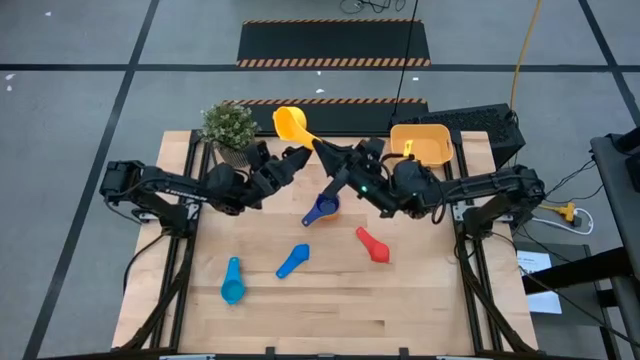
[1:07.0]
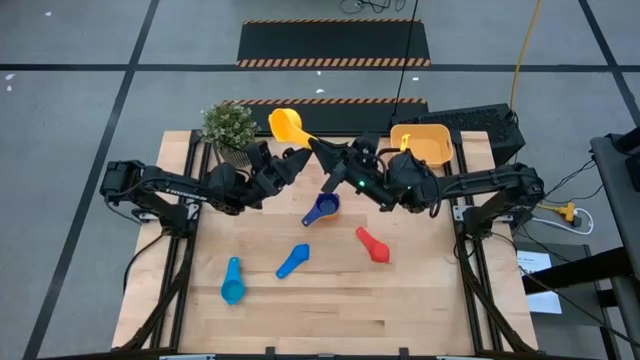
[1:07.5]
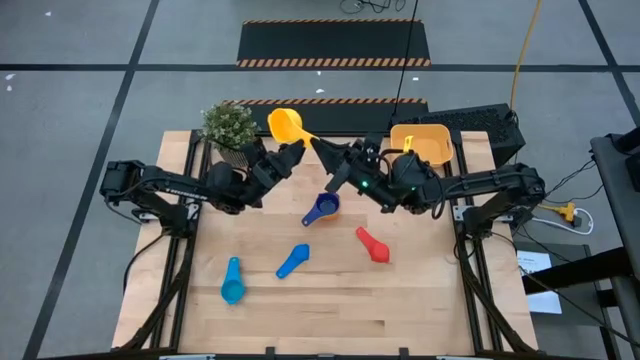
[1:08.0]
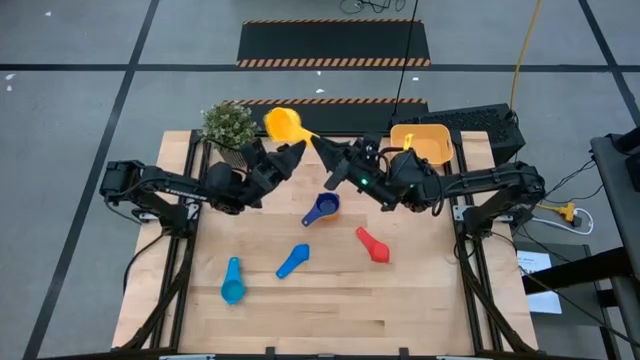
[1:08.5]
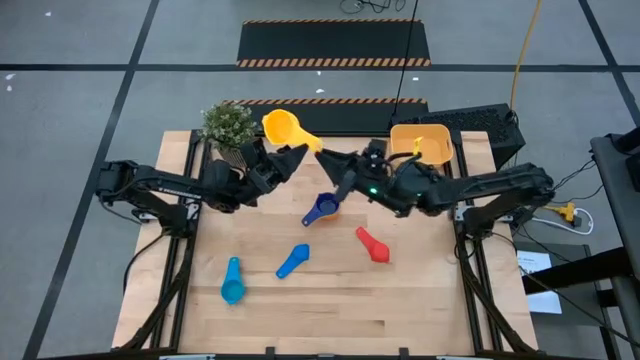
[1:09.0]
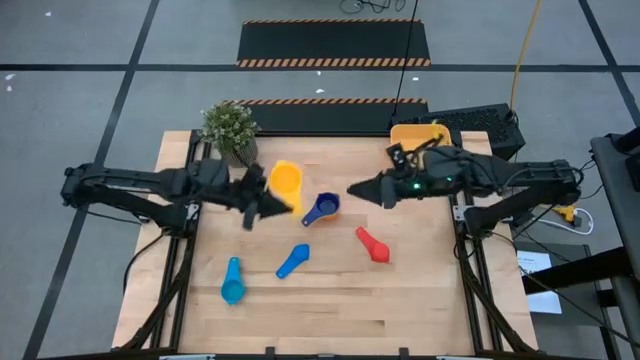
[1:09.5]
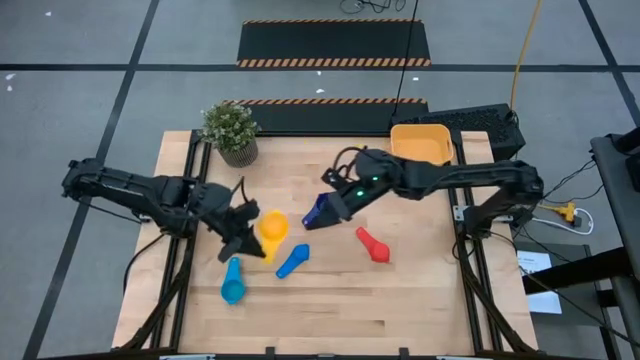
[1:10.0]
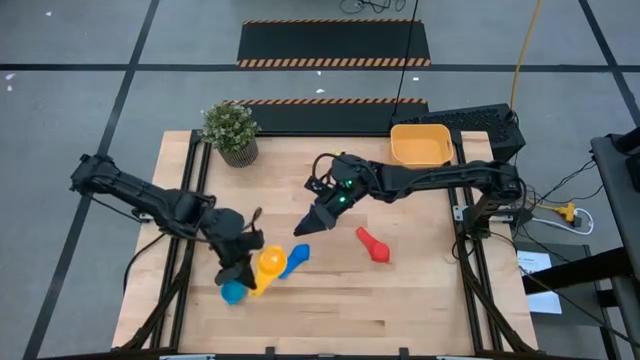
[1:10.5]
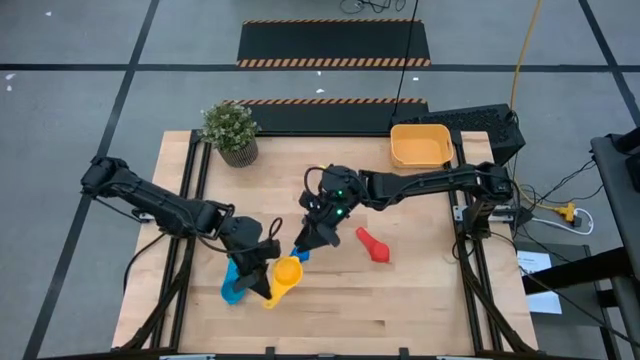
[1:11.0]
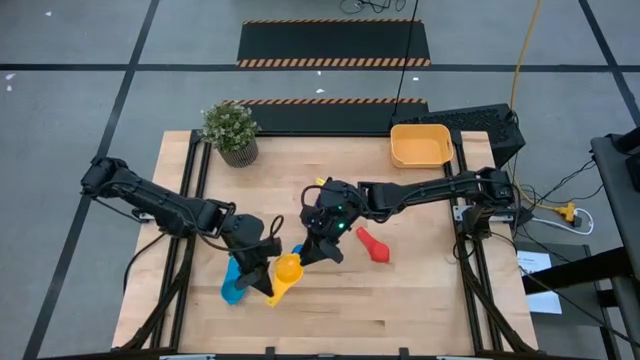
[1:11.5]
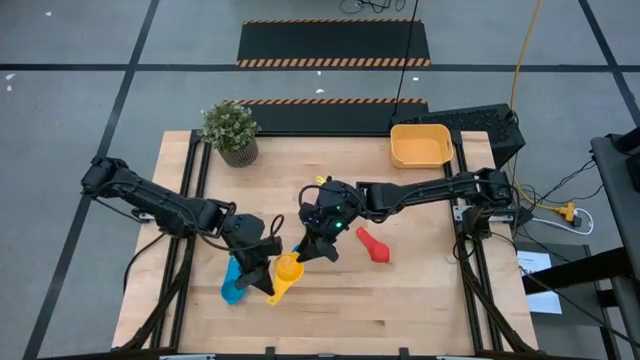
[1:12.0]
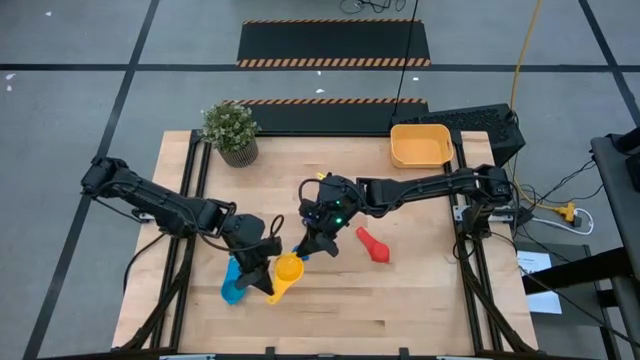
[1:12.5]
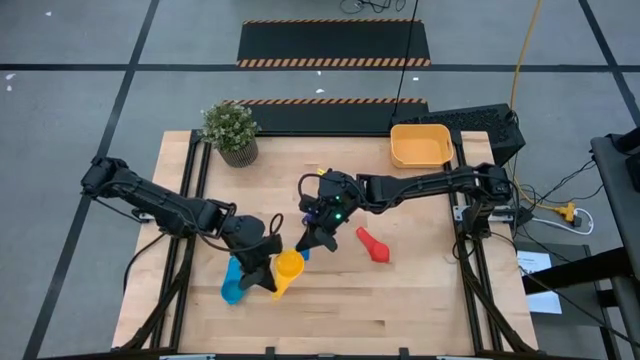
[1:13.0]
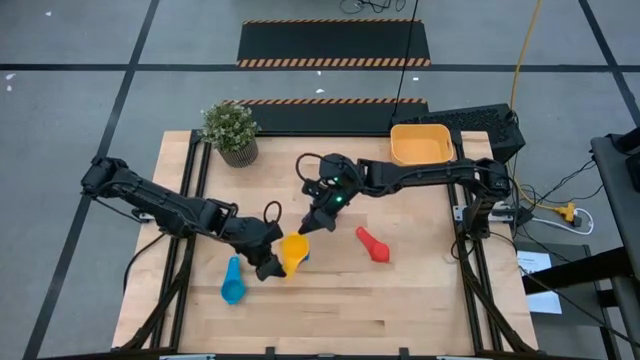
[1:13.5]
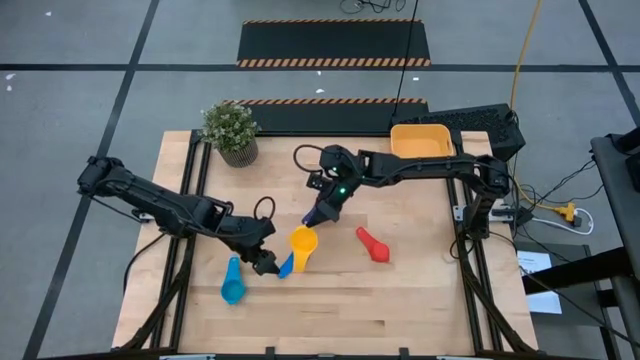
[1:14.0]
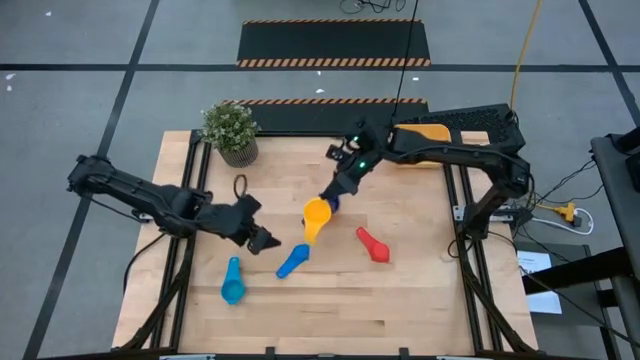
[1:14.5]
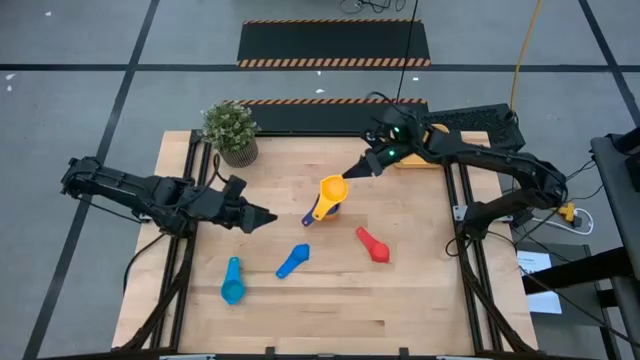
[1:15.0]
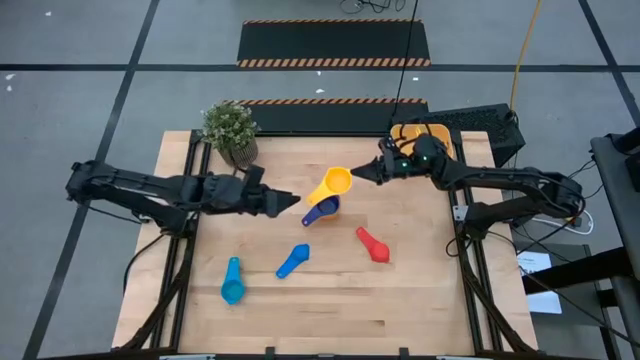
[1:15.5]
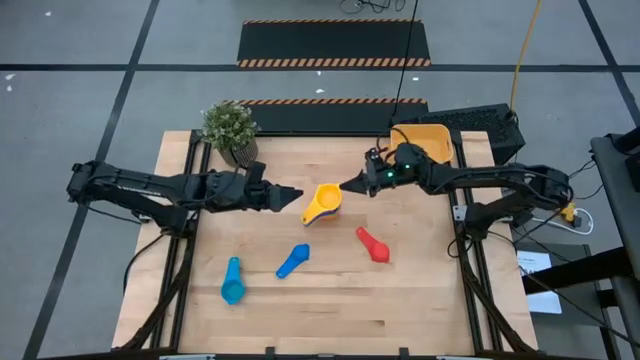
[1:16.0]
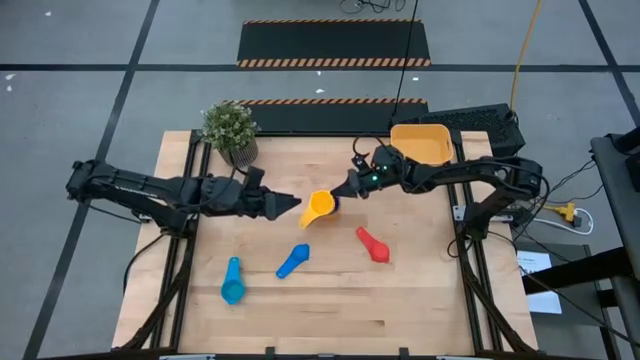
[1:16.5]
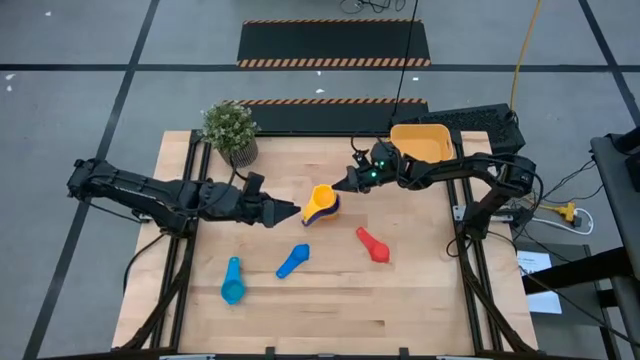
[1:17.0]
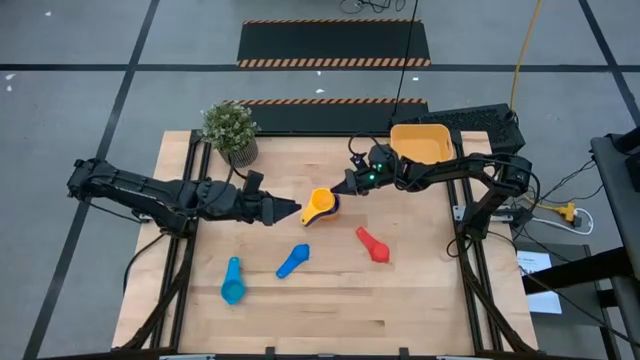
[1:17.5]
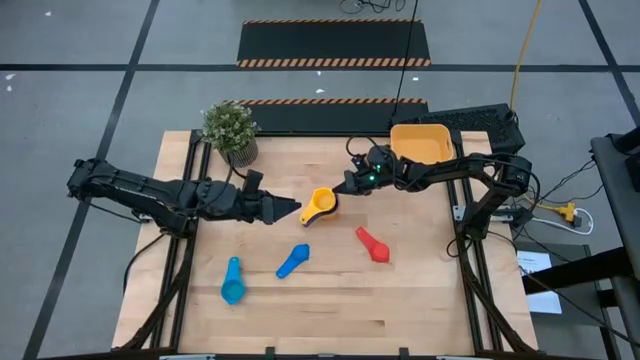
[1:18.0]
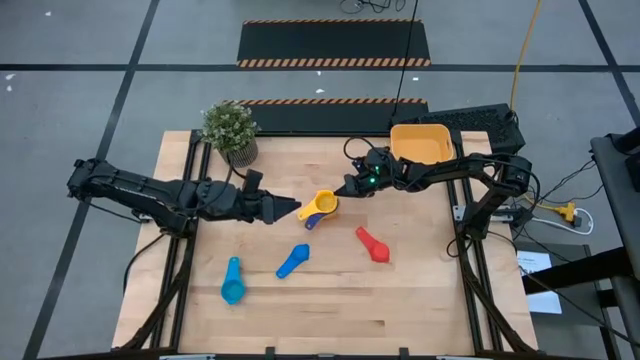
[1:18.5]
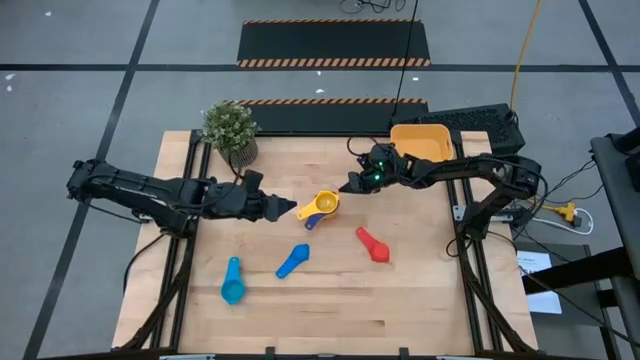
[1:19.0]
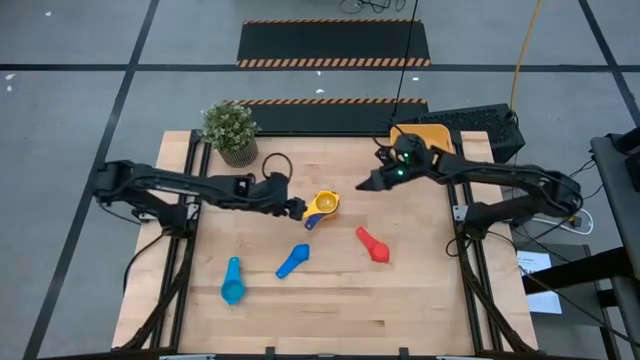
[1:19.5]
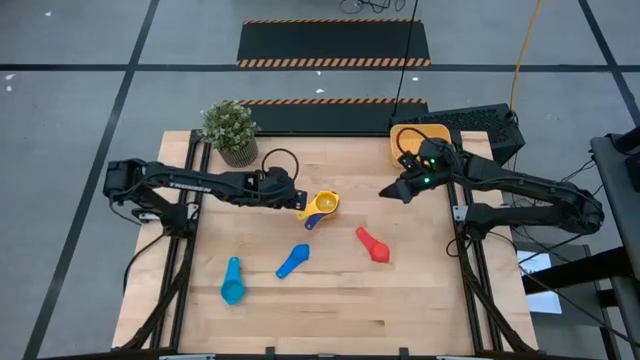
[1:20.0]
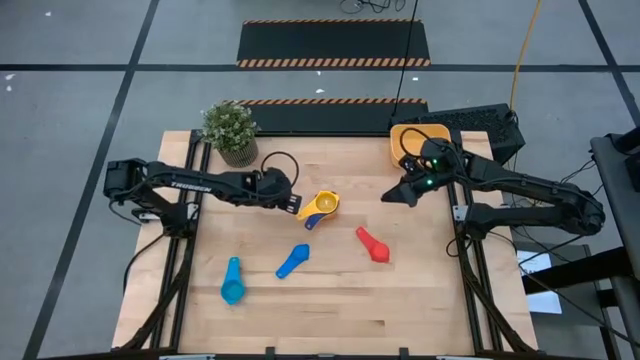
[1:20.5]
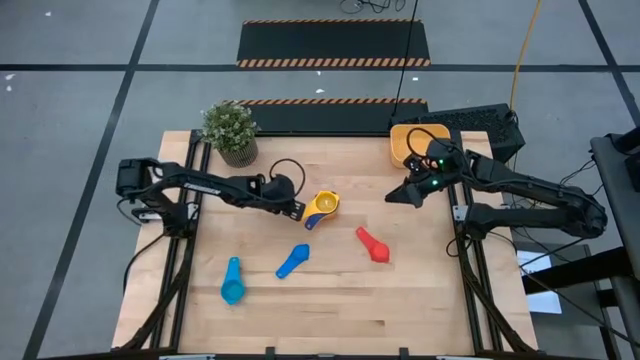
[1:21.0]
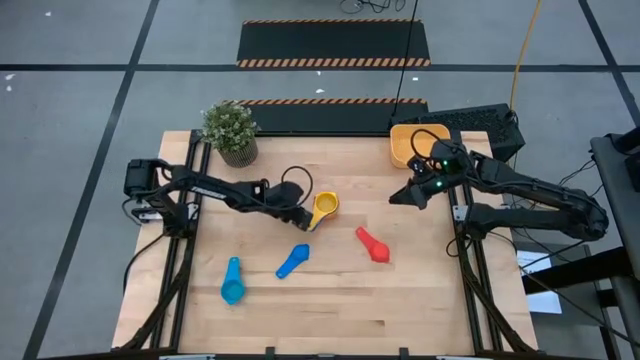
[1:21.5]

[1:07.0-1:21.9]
Task: Nest measuring cups in basket
Stack the yellow measuring cup on top of the dark blue measuring cup

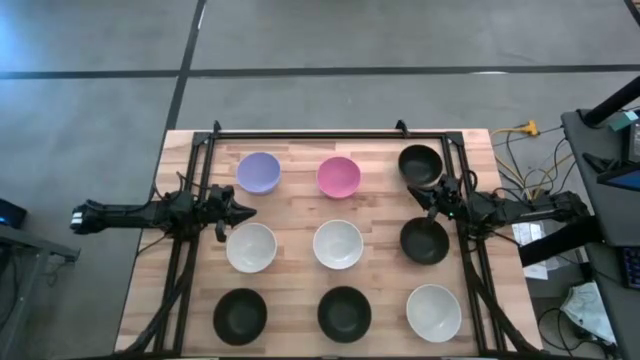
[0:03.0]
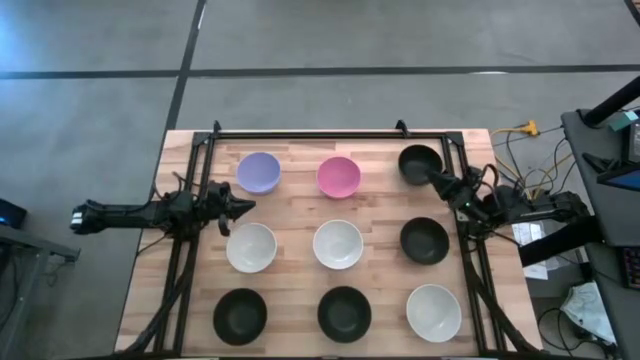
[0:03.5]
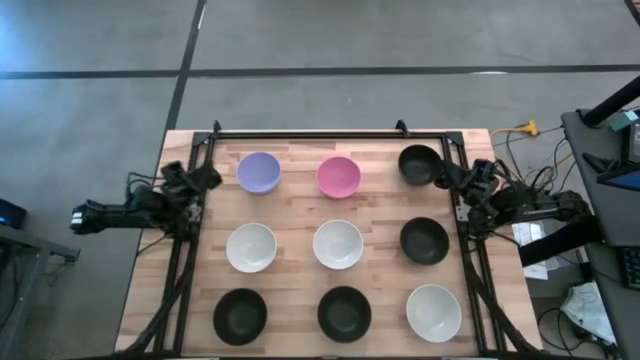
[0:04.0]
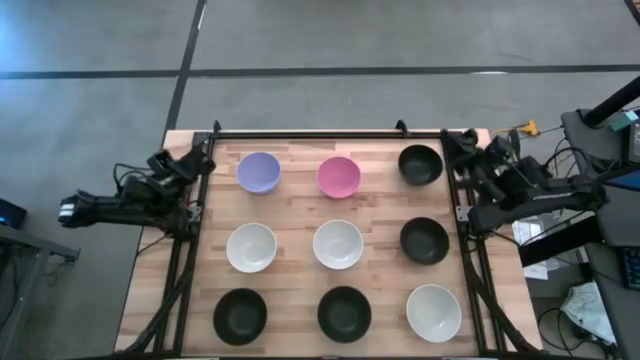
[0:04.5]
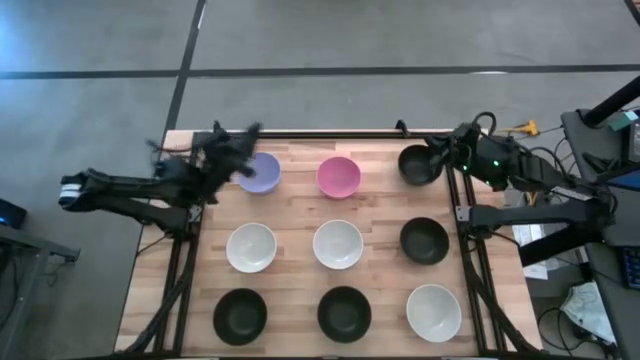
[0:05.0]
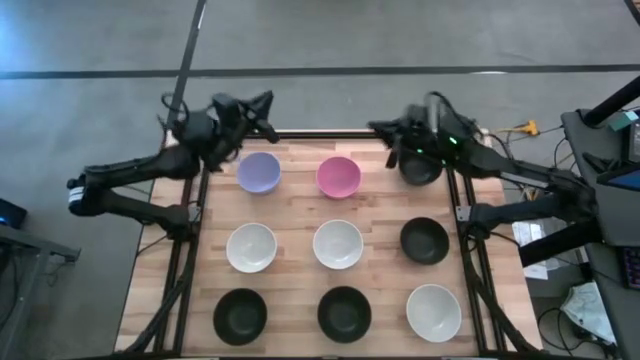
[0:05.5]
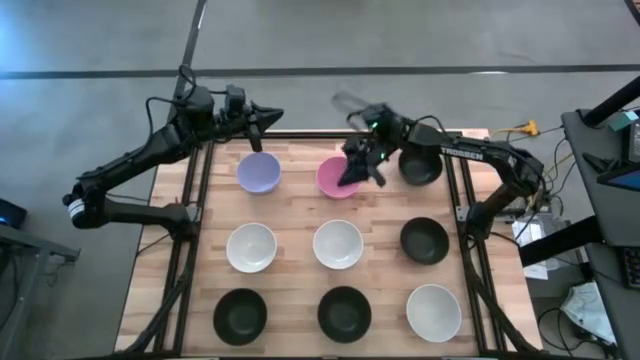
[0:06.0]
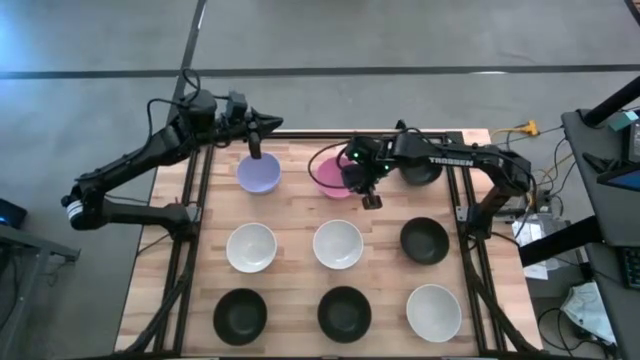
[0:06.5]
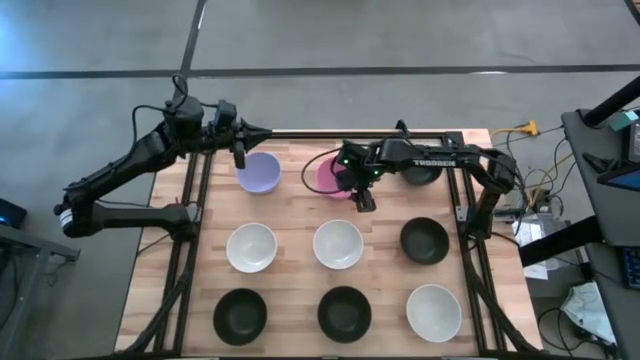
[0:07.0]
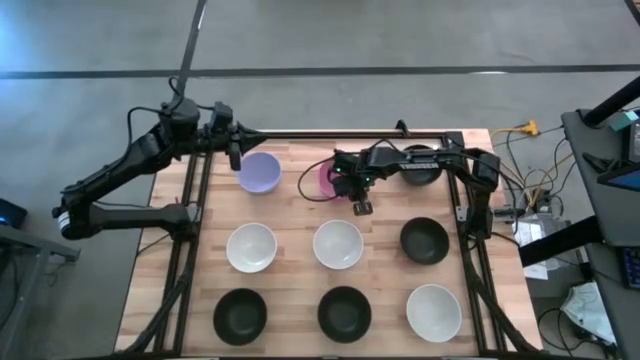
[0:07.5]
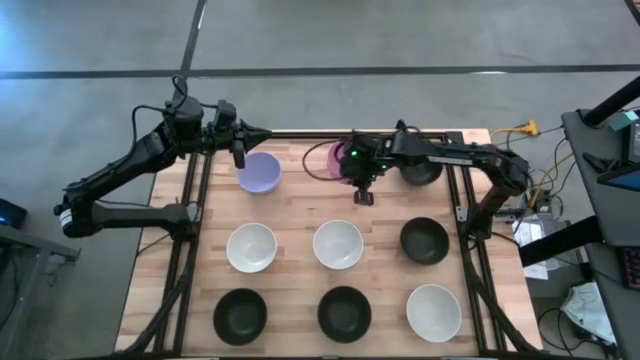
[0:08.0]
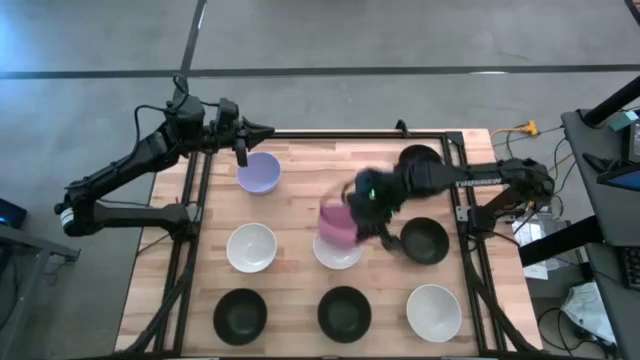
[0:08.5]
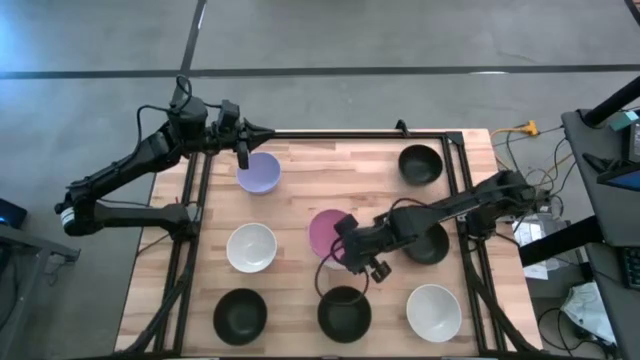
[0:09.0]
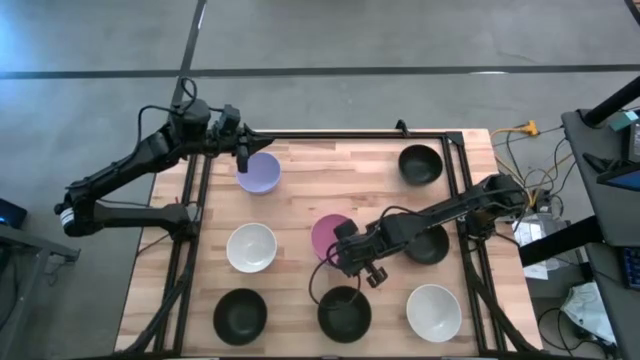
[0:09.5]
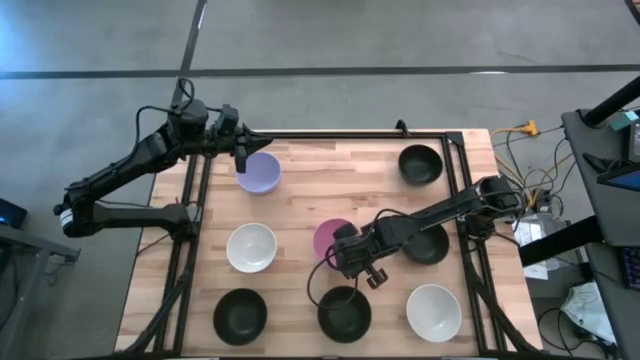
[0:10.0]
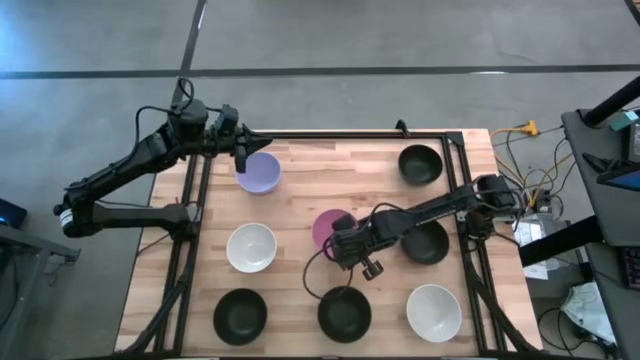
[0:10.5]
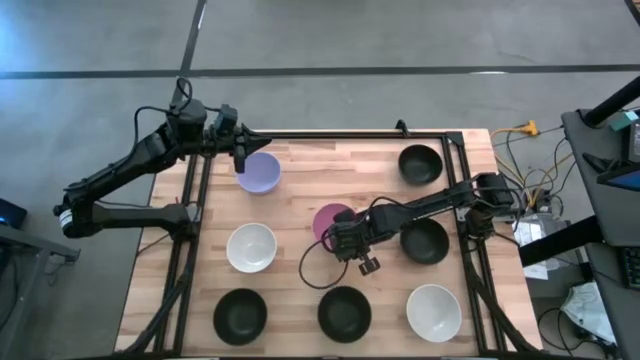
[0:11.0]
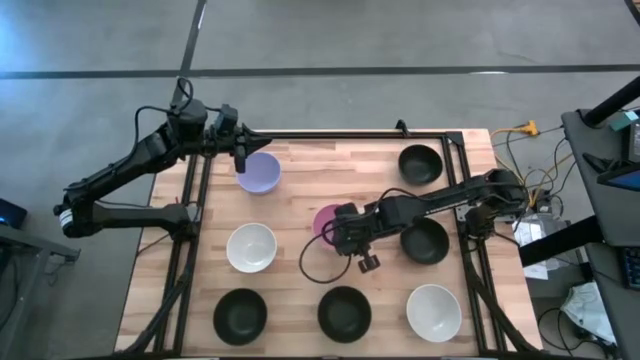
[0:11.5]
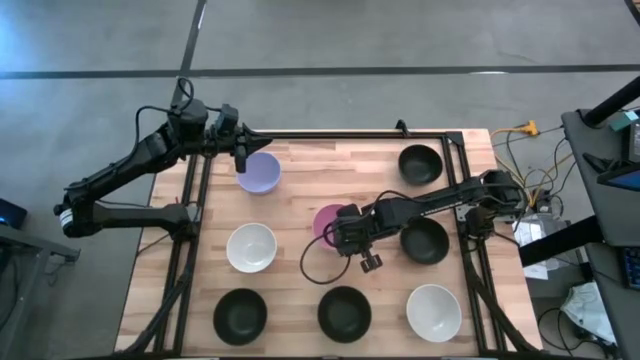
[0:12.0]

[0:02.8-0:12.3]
Task: Nest bowls inside each other
Stack the pink bowl on the white bowl
